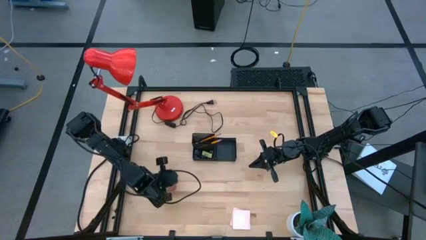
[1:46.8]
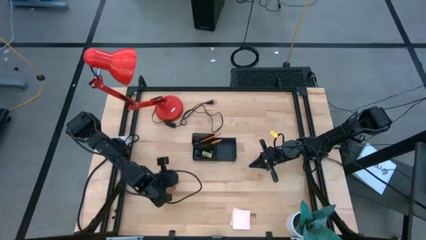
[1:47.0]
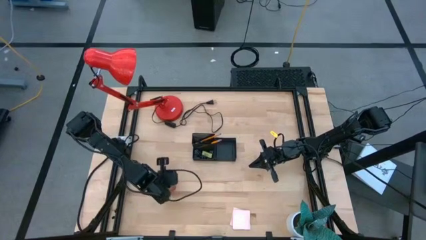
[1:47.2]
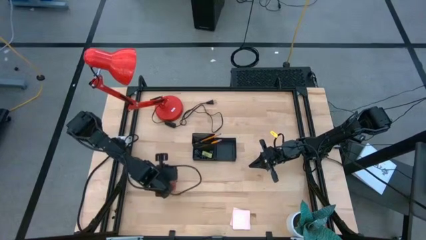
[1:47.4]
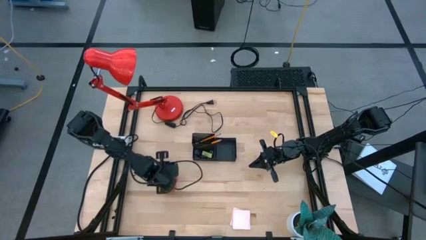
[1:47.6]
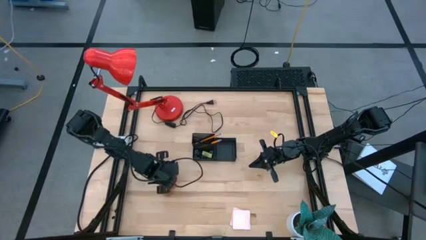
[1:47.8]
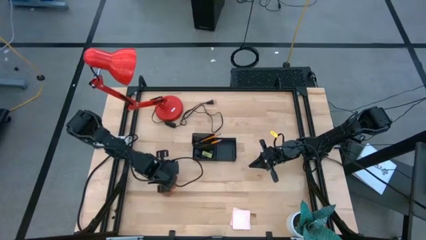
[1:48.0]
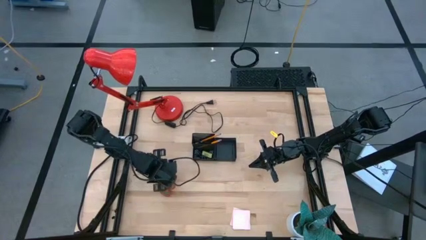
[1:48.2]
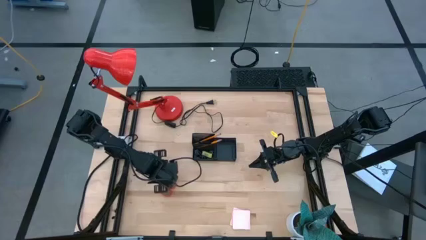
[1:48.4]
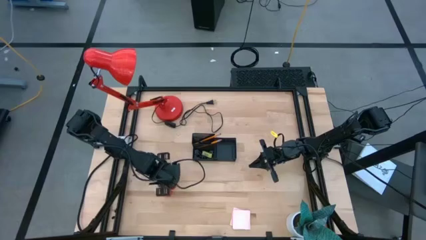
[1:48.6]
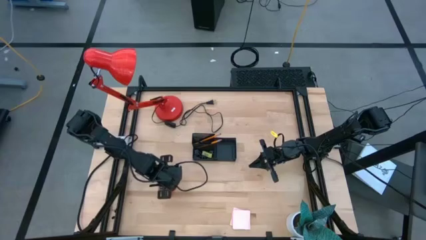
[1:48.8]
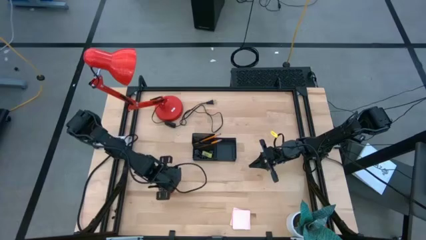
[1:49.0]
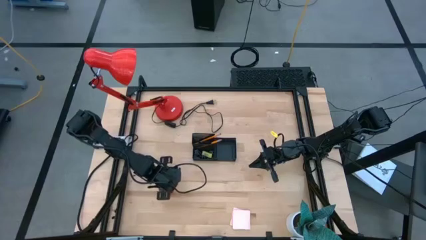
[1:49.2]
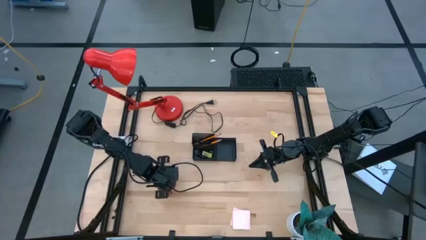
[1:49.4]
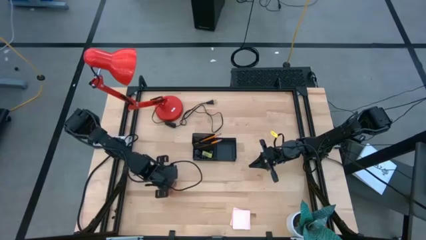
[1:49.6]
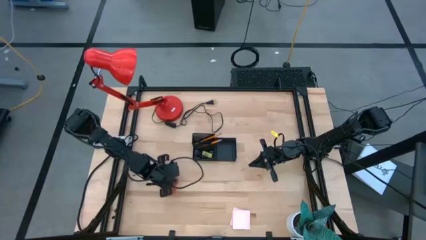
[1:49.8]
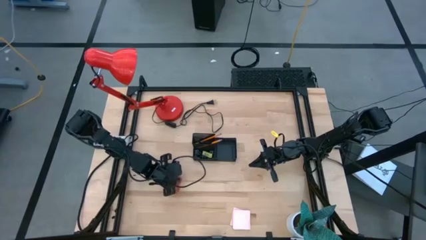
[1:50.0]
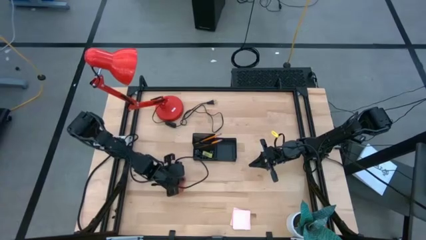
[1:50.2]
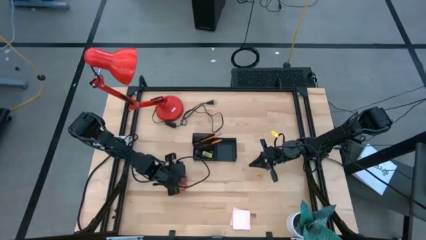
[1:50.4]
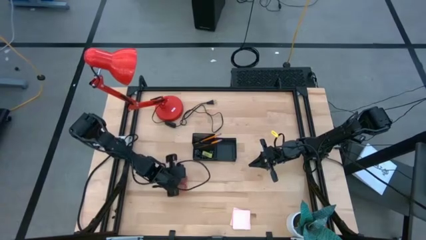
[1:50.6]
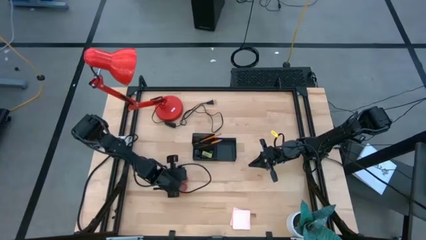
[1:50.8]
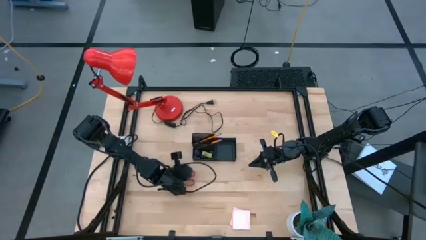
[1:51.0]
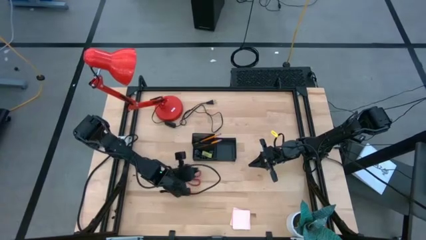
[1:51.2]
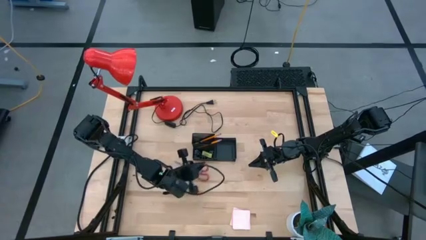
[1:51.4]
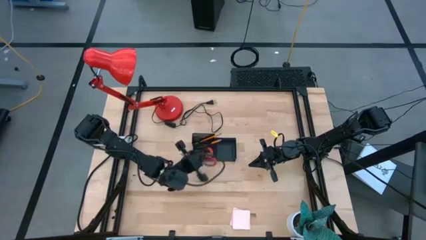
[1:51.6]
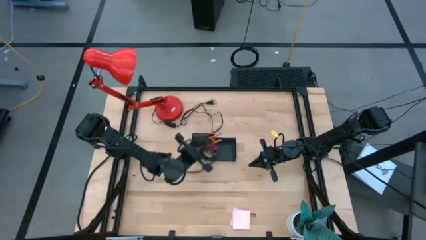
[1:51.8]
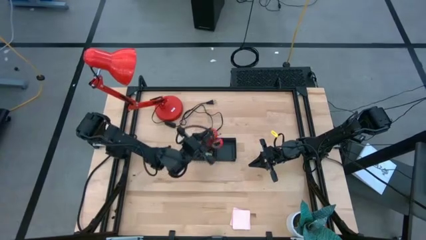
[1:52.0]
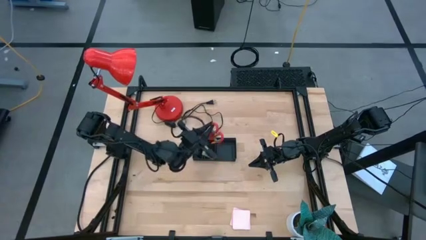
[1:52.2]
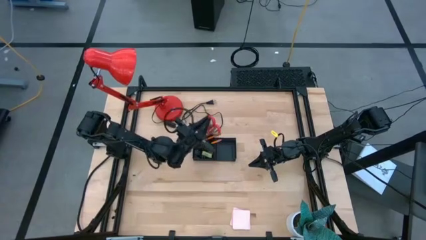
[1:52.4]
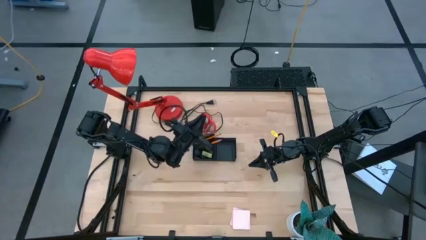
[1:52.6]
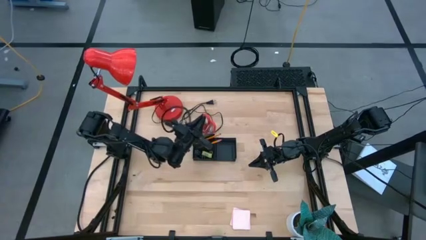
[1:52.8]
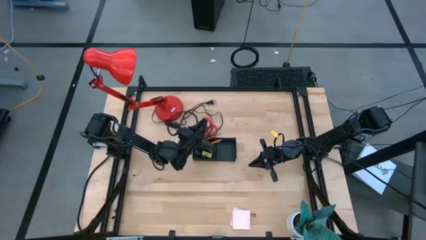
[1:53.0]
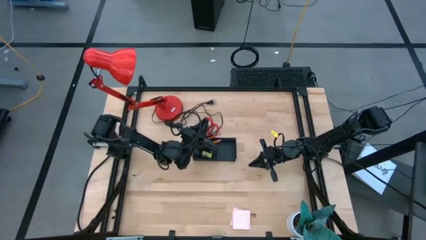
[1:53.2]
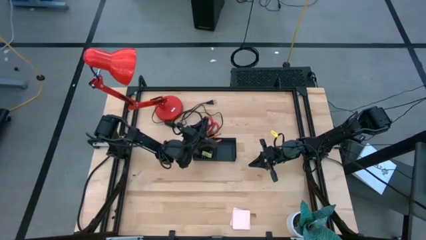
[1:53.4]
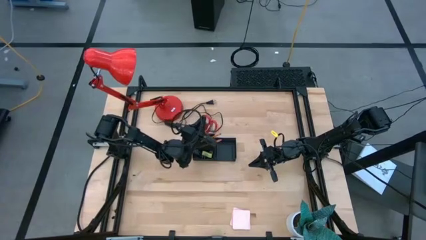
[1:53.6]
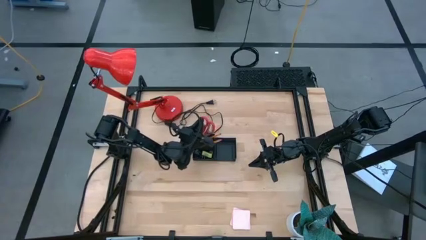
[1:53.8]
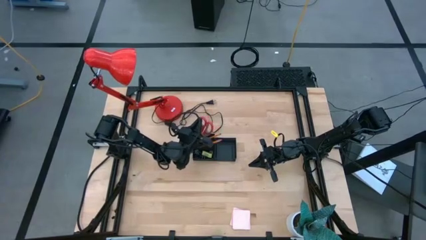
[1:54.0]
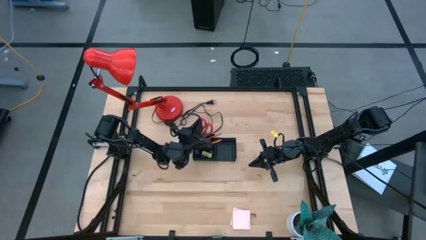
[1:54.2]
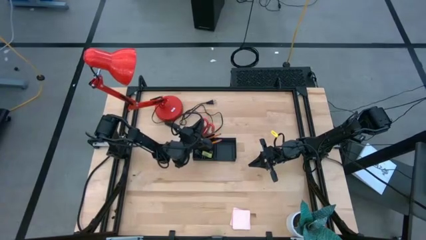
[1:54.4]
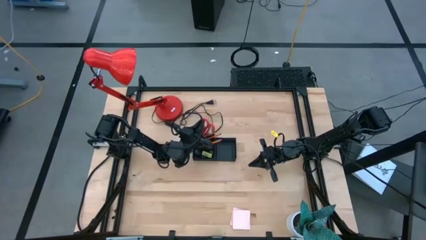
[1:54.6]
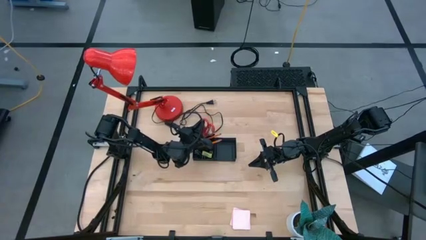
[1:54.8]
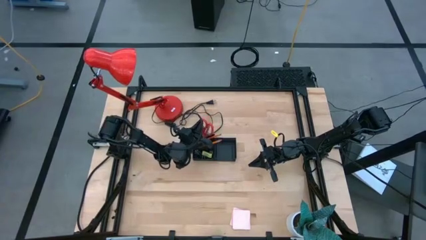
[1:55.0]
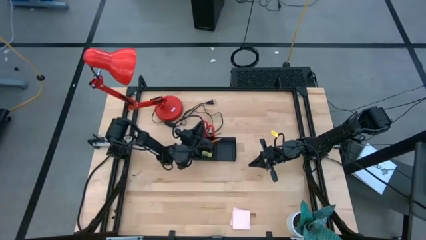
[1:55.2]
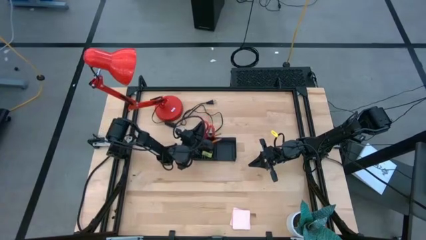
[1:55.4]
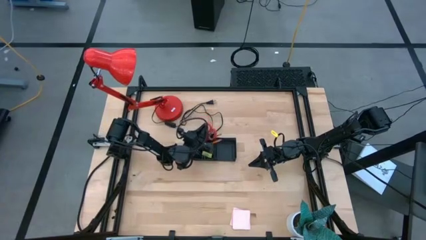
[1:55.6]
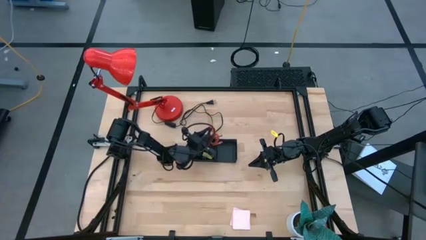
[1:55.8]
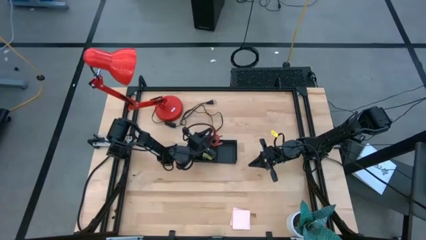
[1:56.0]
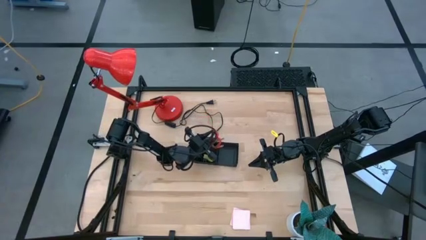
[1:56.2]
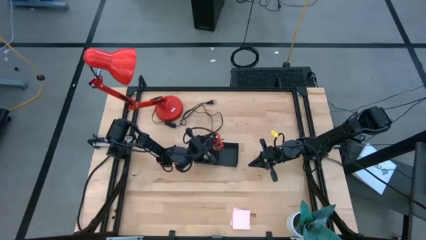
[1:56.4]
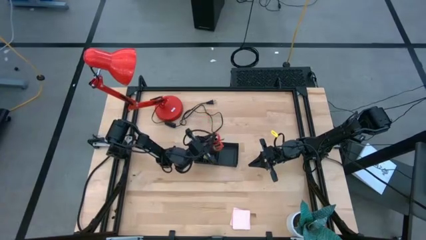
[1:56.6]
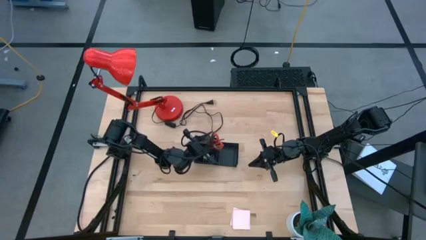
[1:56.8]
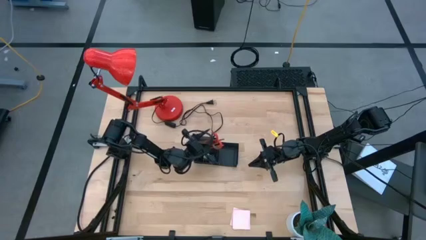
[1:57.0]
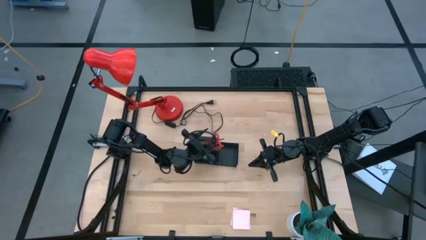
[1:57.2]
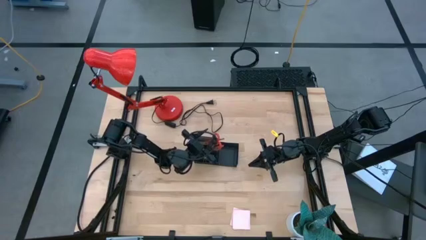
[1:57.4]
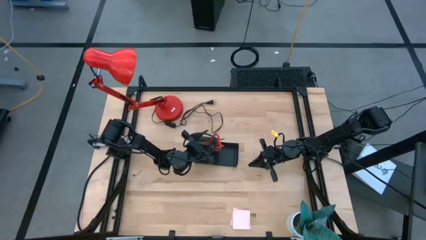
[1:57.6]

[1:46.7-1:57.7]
Task: Pick and place office supplies into organizer
Put the red scissors into the desk organizer
